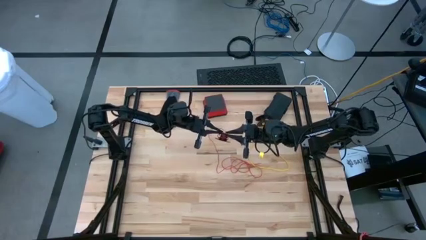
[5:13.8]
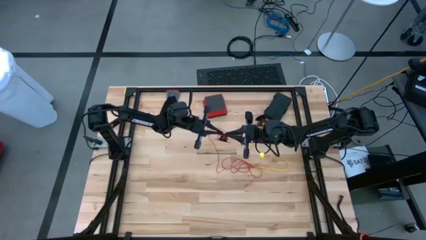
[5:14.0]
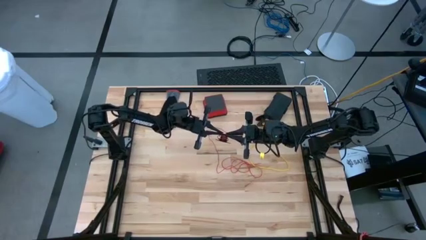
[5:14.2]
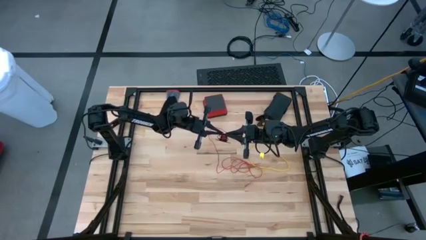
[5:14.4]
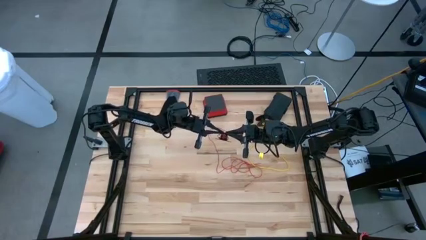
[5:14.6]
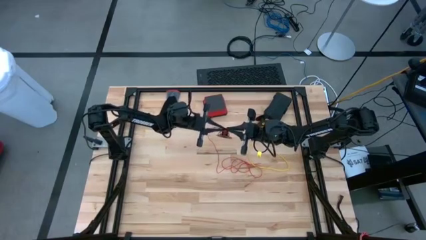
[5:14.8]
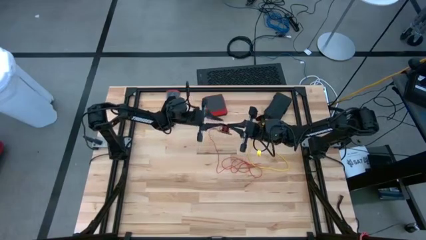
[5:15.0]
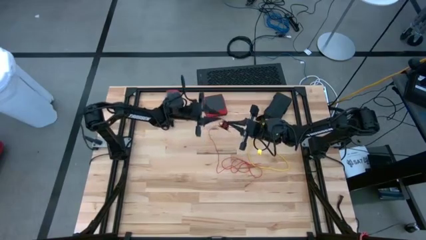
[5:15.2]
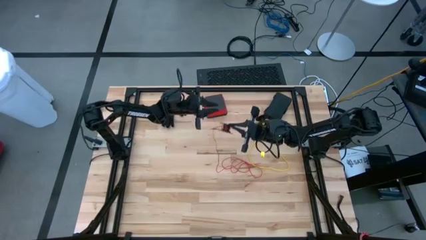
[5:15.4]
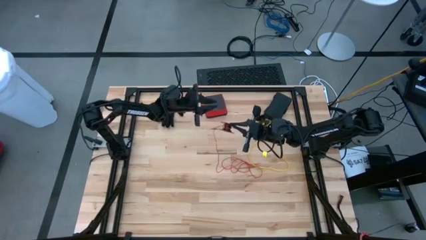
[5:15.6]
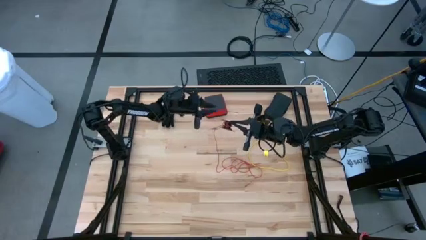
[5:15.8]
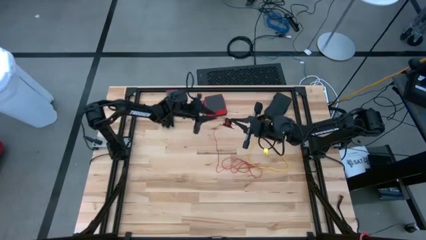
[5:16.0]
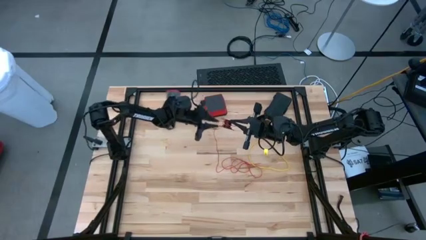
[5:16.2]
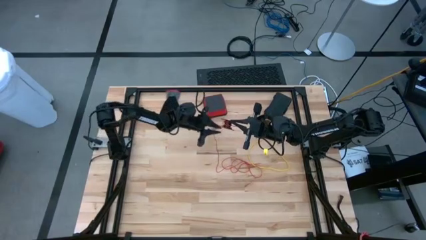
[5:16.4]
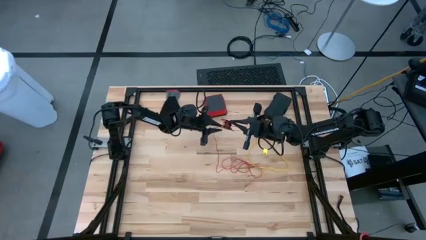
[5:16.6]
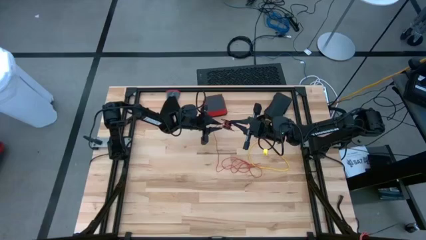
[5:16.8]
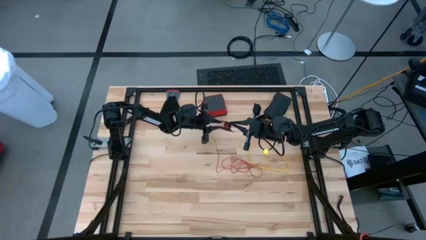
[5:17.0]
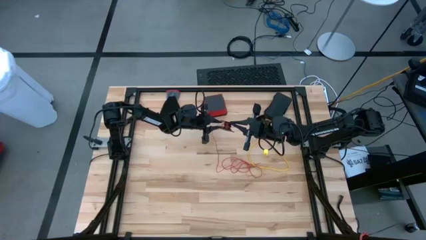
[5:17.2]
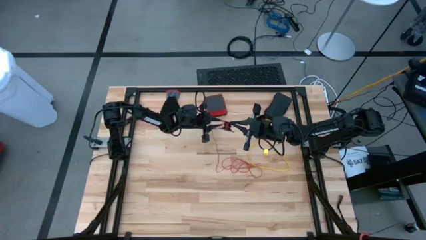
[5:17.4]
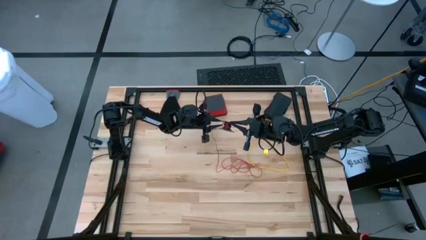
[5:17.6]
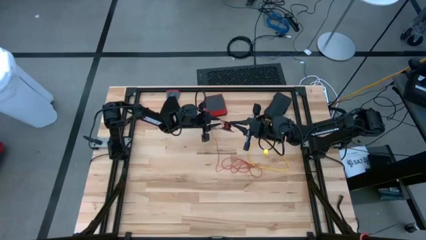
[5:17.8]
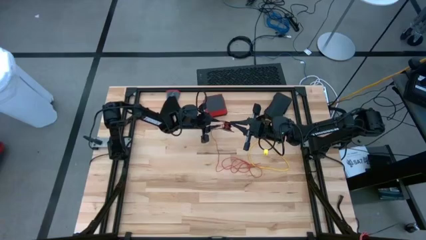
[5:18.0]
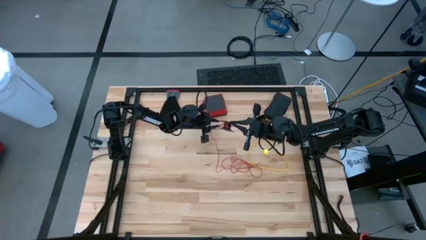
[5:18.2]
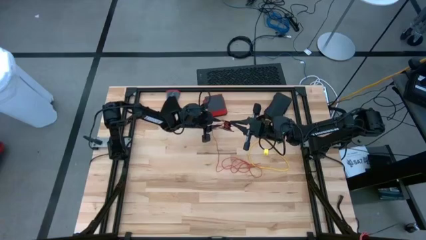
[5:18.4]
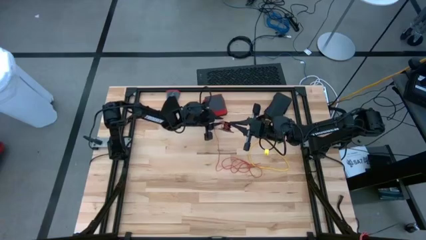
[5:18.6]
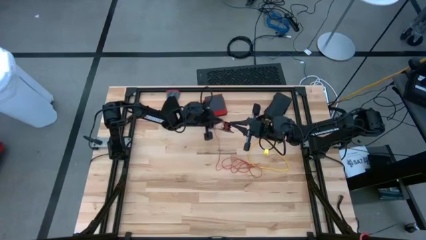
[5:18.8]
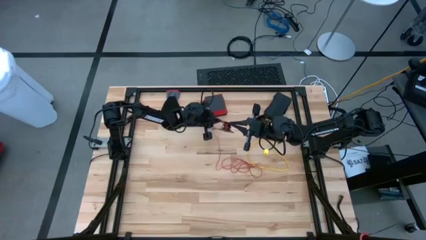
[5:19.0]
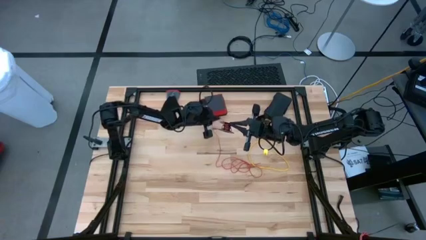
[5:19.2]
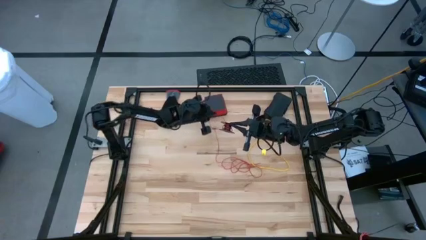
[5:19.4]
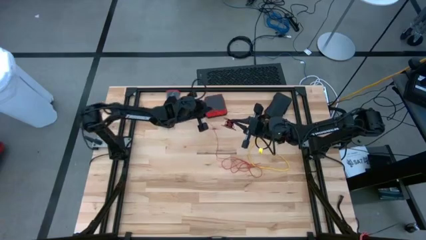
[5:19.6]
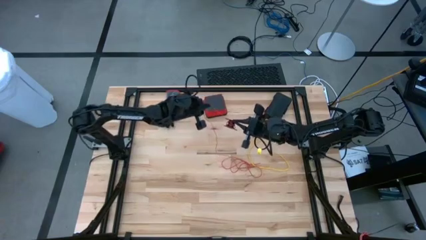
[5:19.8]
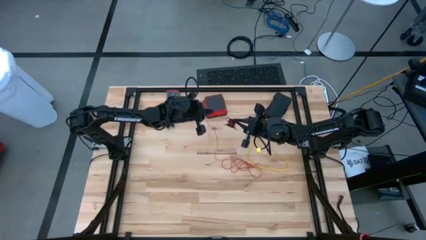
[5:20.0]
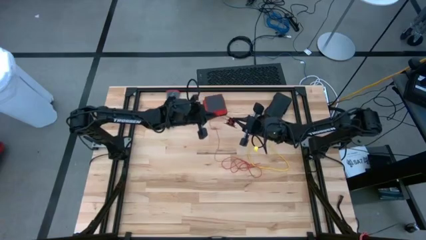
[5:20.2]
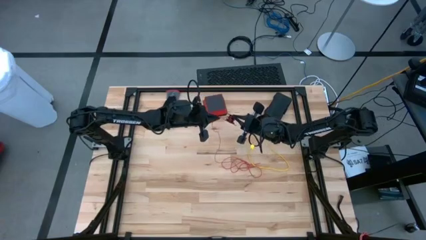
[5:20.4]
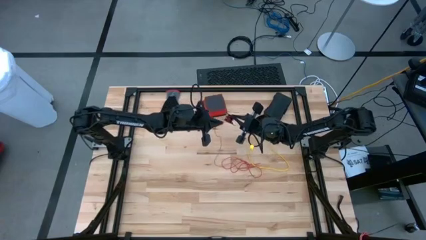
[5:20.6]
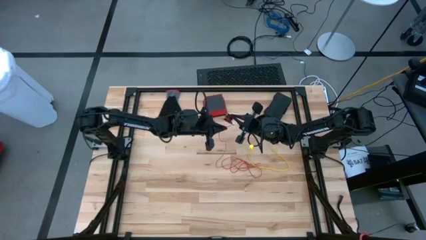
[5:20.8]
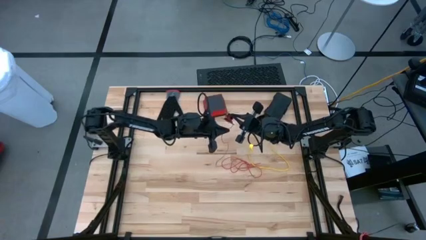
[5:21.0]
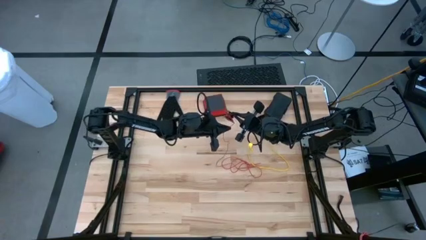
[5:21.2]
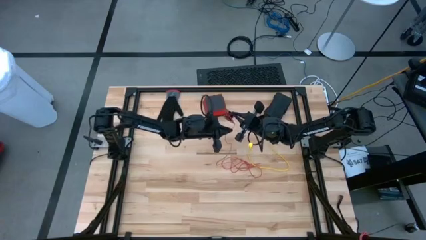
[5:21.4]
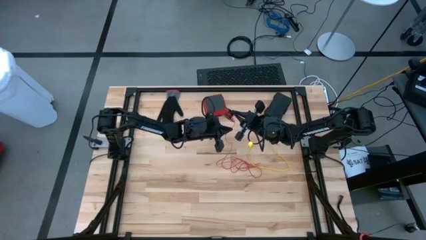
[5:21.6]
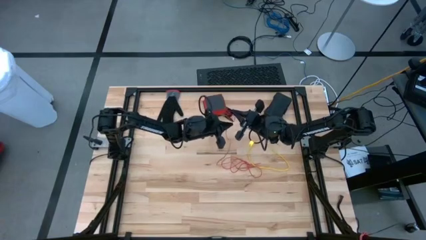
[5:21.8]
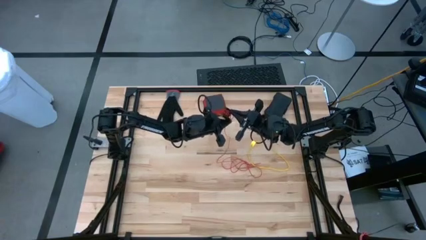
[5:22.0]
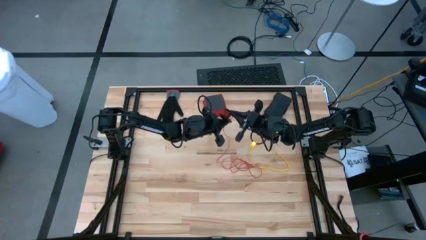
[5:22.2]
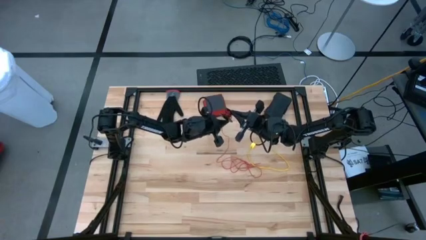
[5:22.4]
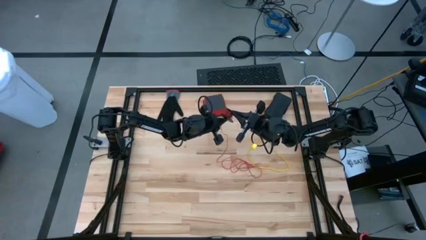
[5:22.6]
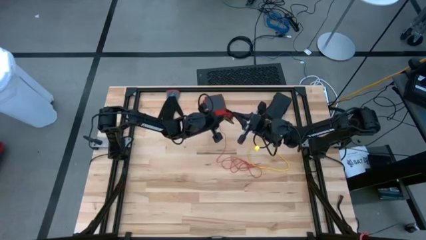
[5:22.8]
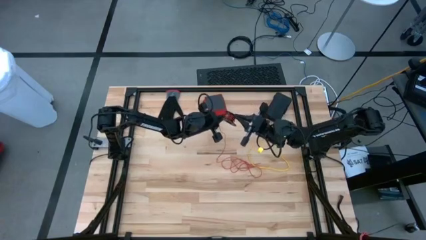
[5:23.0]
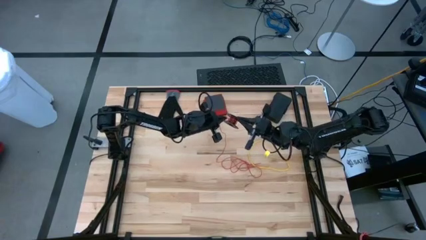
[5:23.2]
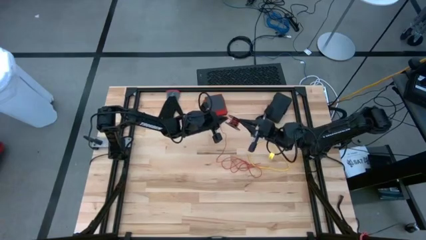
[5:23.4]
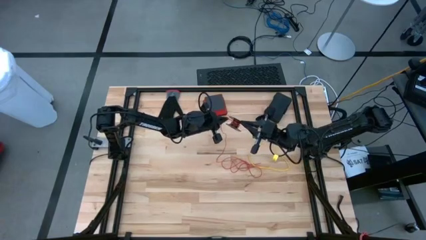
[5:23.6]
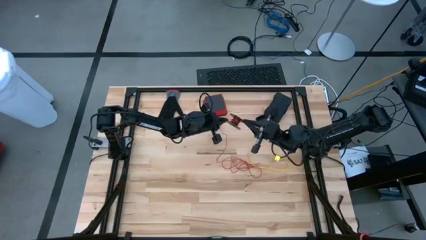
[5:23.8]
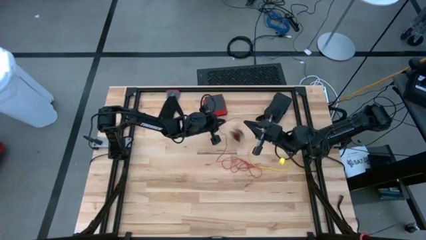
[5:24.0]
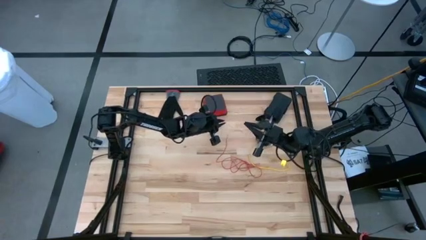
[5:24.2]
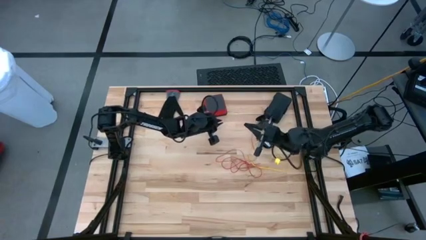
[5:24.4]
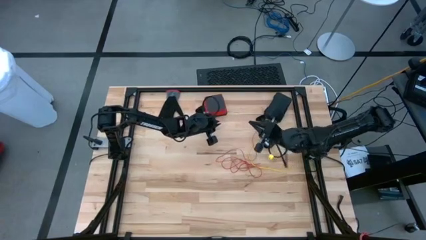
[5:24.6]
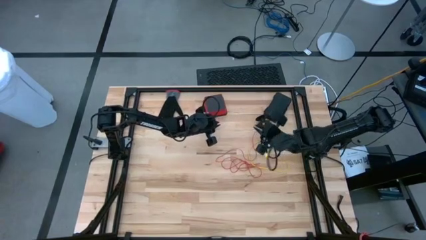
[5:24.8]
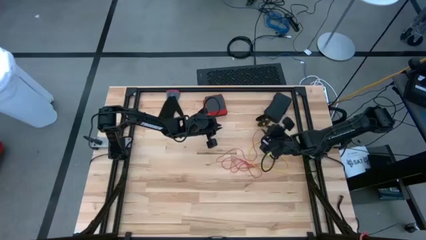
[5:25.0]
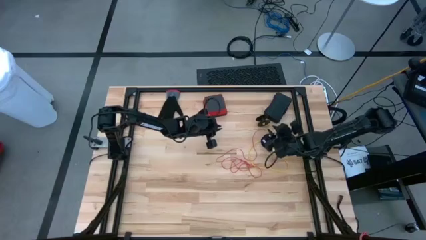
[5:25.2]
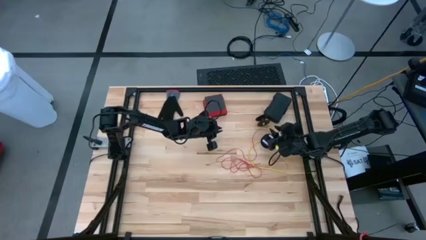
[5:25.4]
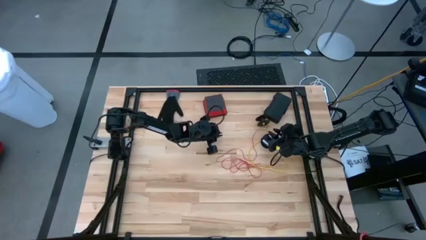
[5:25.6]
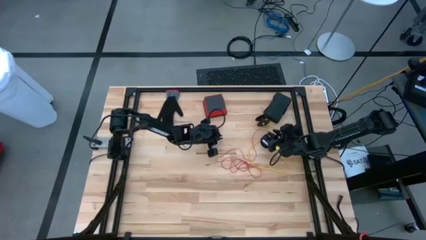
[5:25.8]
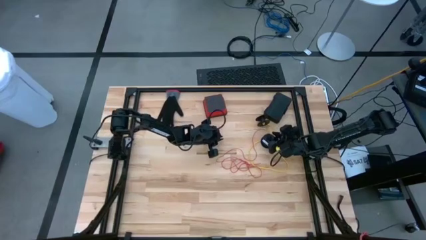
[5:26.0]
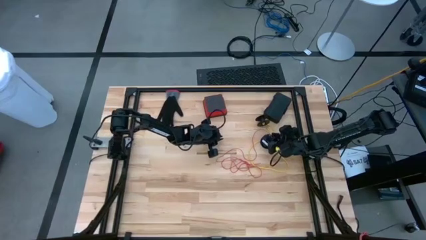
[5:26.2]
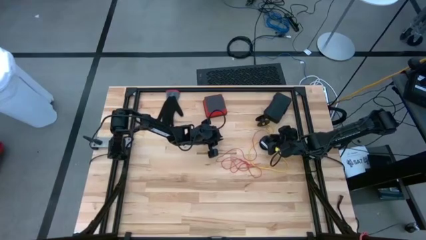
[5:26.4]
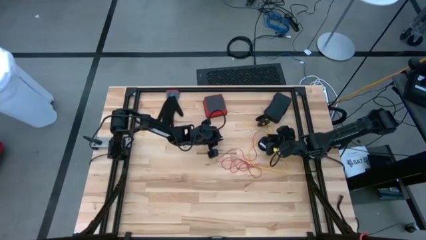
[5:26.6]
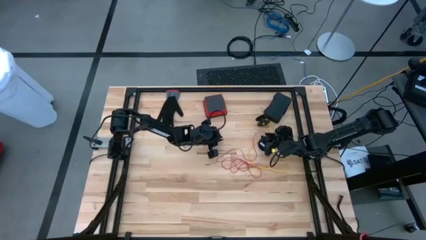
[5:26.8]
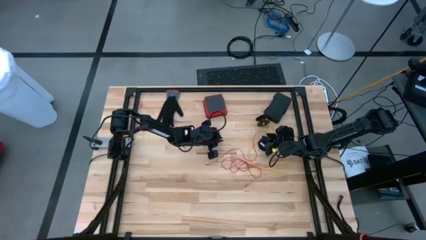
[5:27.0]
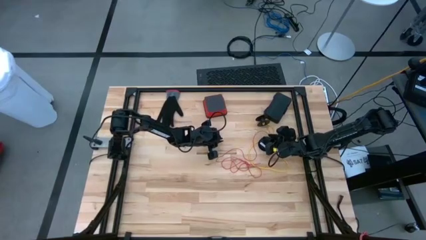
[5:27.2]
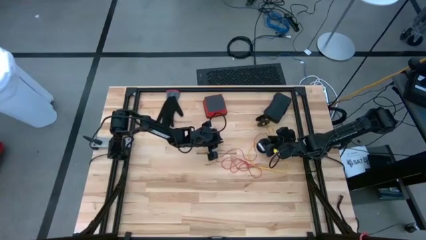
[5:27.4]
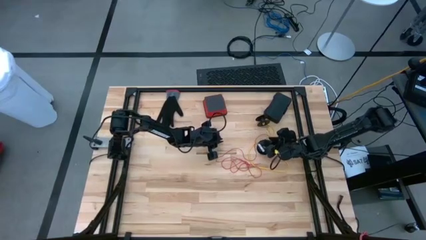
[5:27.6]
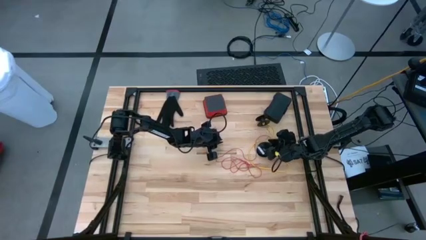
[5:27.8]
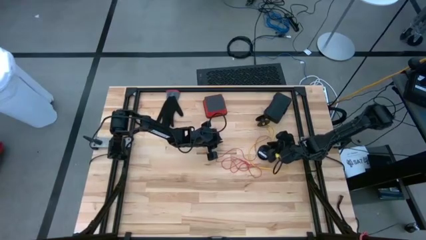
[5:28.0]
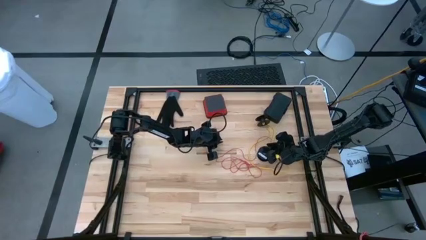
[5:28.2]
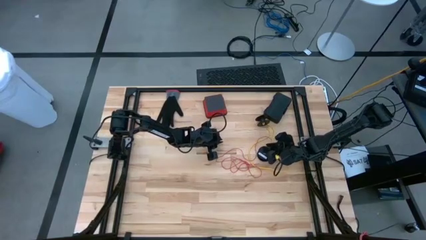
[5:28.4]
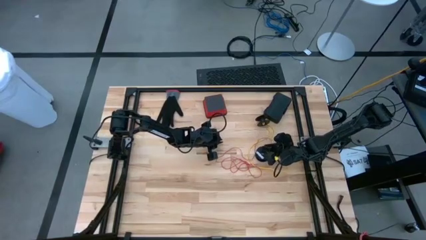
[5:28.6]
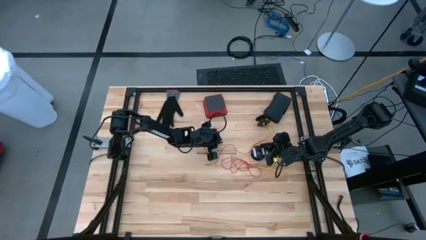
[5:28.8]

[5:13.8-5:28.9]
Task: Coil cords
Coil the red wire onto the spool
